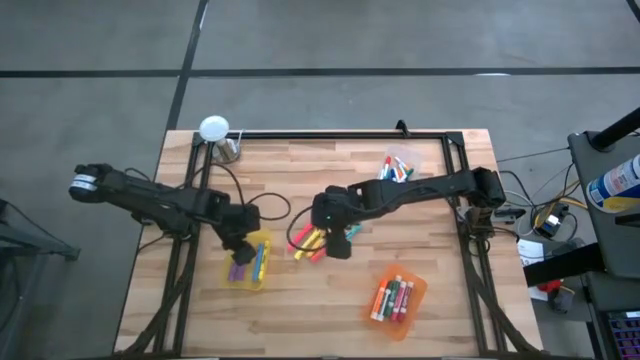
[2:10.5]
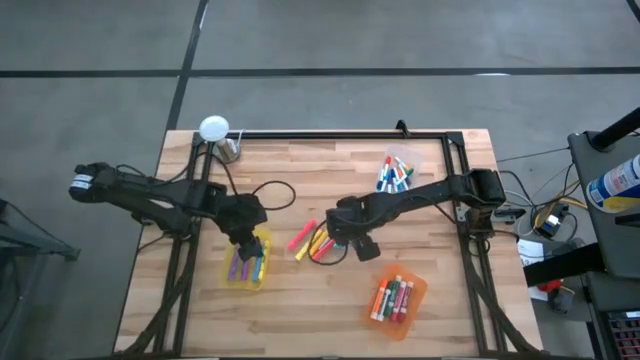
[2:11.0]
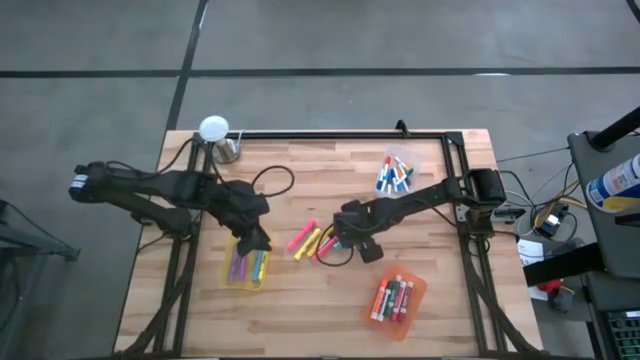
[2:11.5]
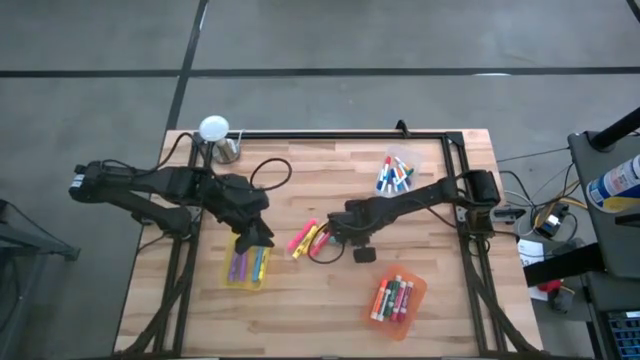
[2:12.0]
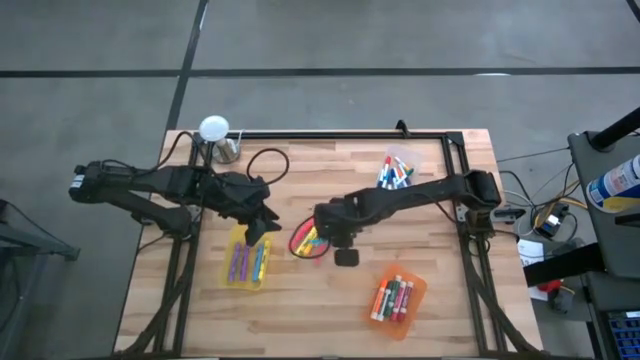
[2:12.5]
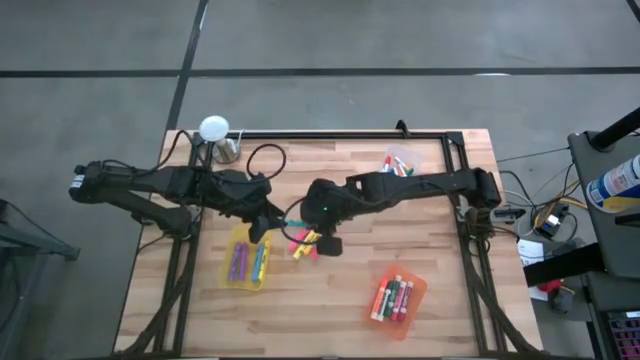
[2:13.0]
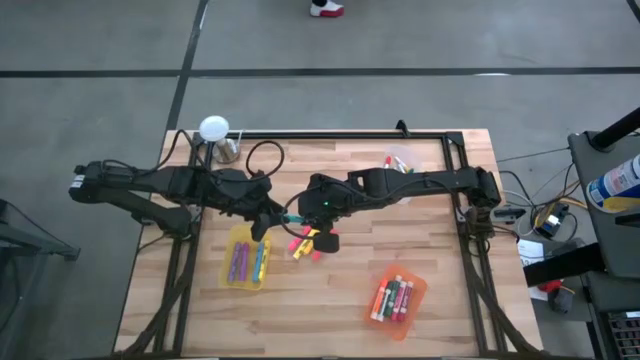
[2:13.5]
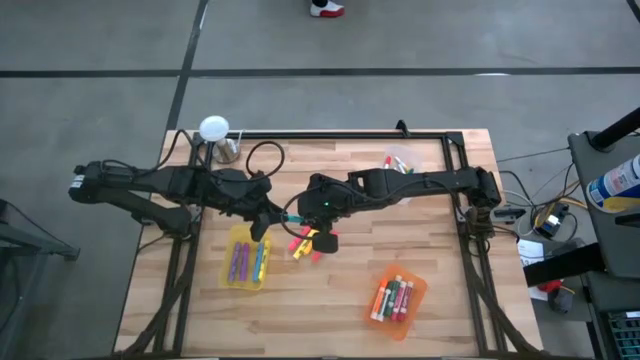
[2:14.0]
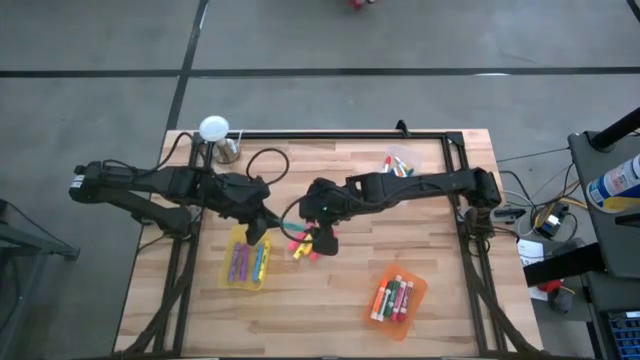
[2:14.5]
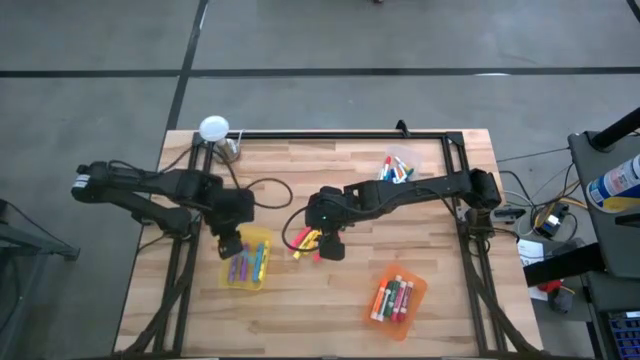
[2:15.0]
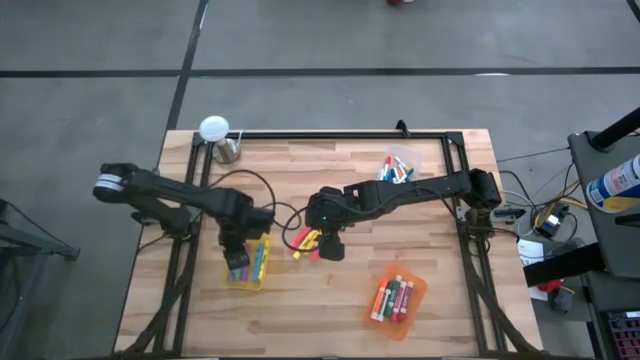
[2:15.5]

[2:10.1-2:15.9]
Task: Pick & Place Markers
Put the large light blue highlighter pen into the yellow bin

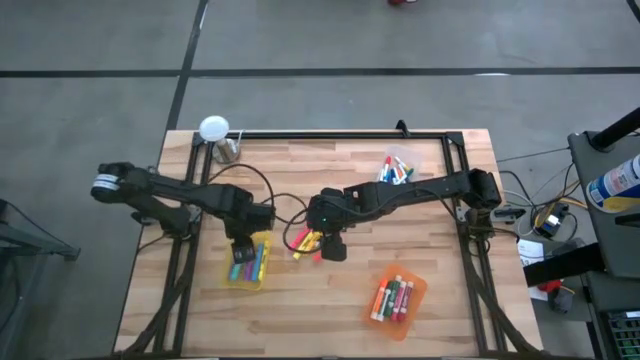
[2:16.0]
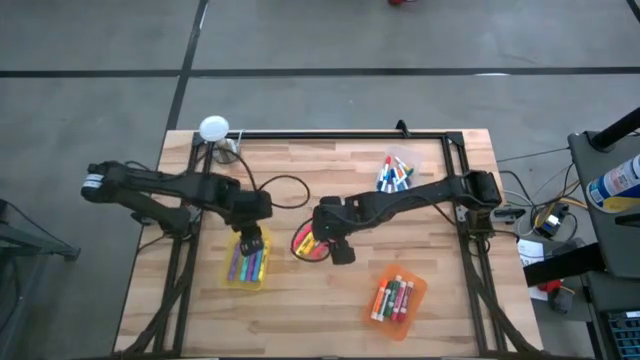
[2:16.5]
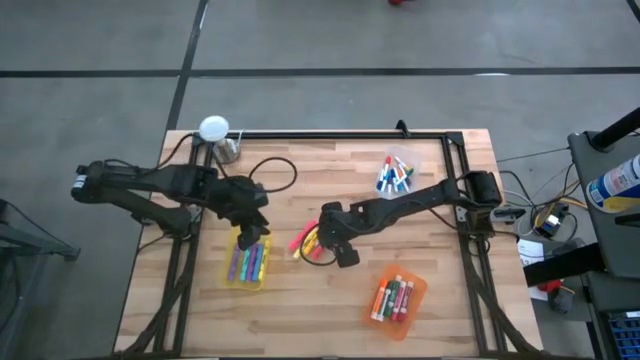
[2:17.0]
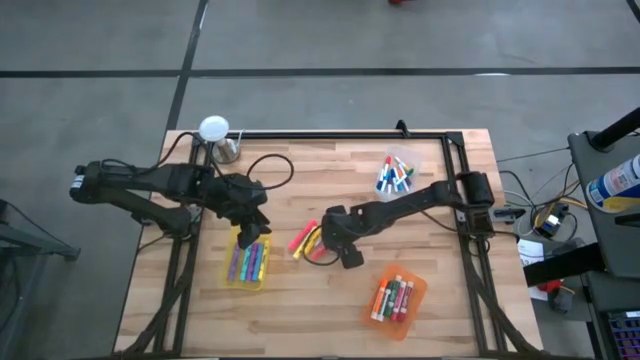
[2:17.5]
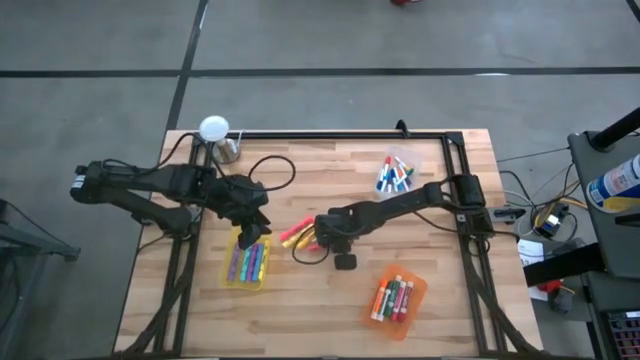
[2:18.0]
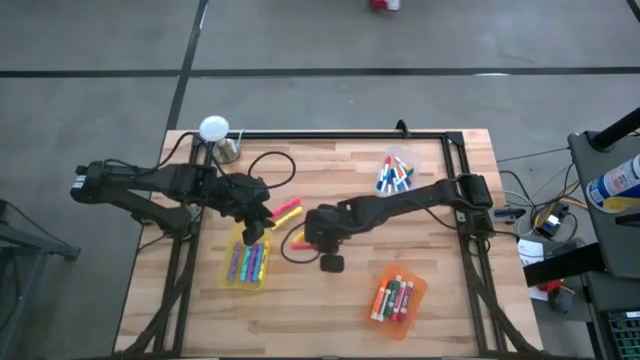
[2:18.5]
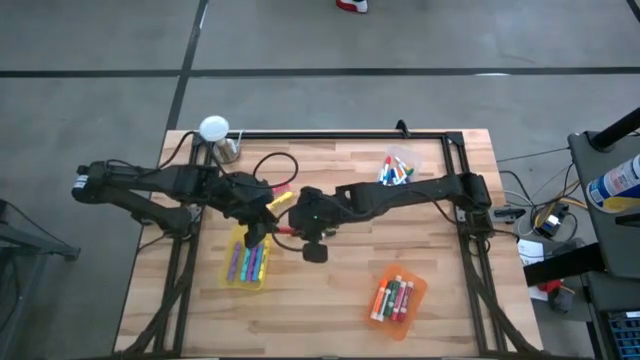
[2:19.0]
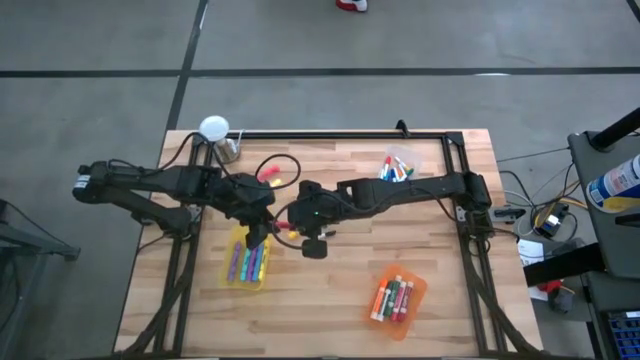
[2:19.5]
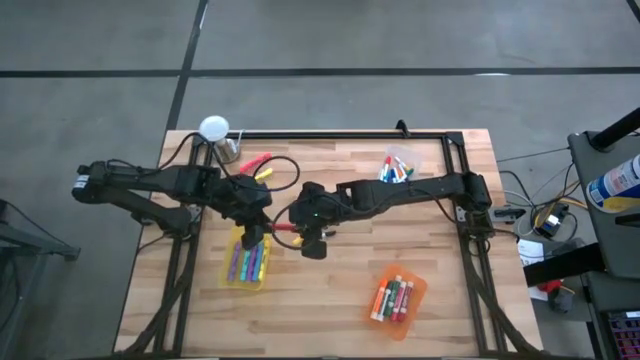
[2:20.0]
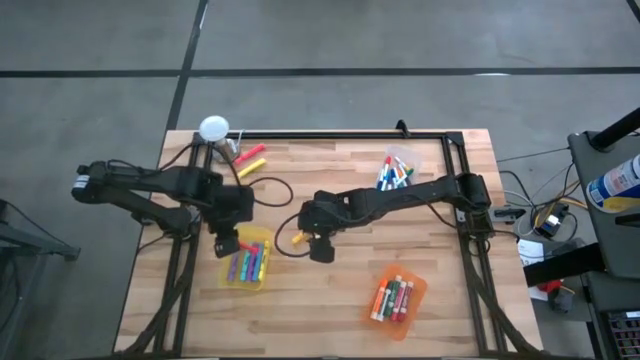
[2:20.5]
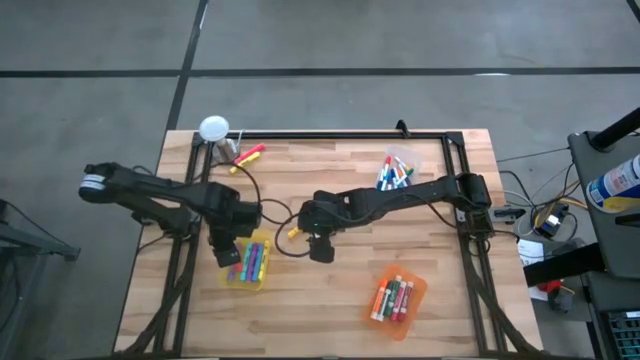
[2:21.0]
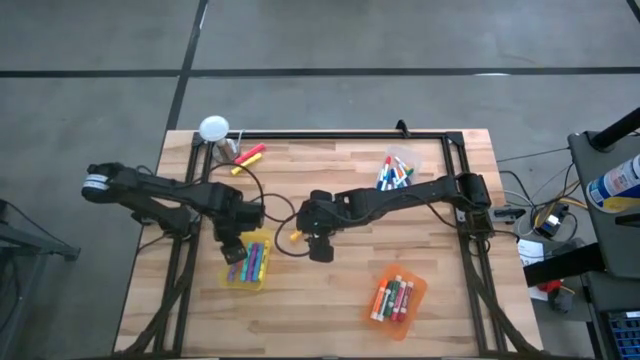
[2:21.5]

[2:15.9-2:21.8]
Put the large orange highlighter pen into the yellow bin

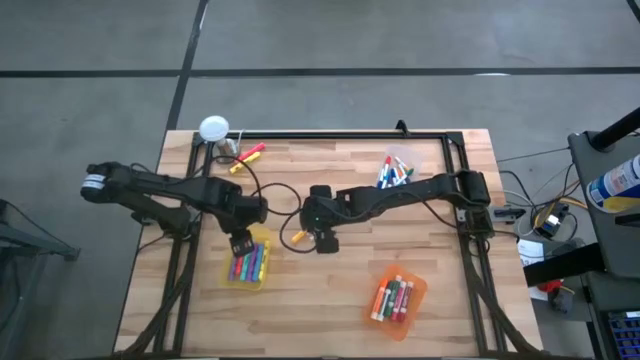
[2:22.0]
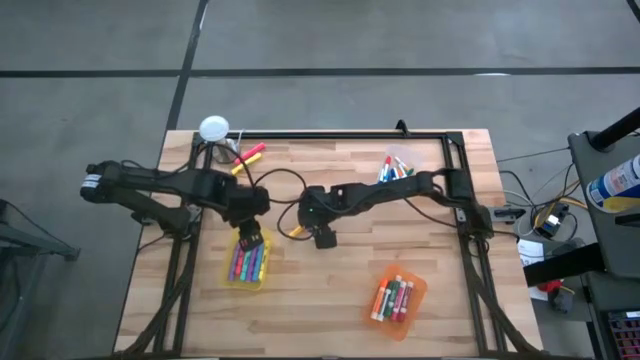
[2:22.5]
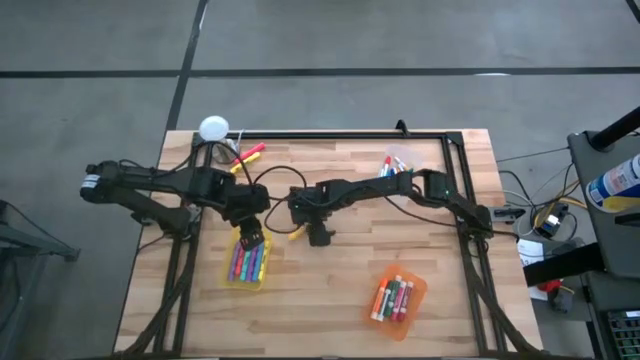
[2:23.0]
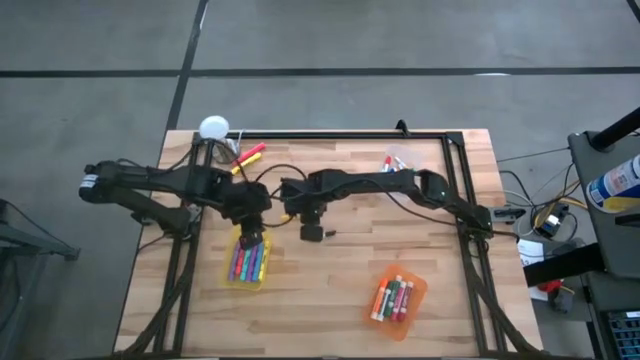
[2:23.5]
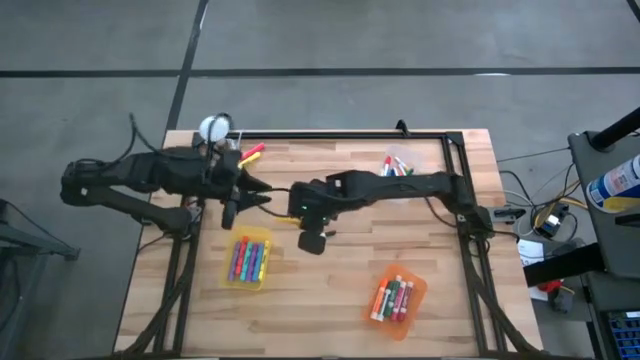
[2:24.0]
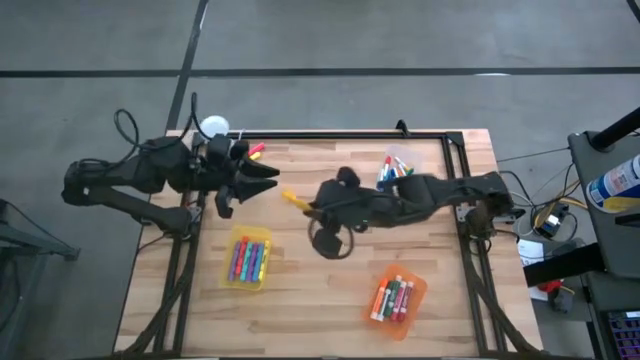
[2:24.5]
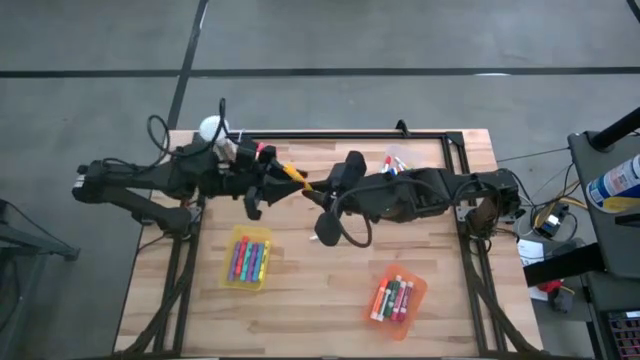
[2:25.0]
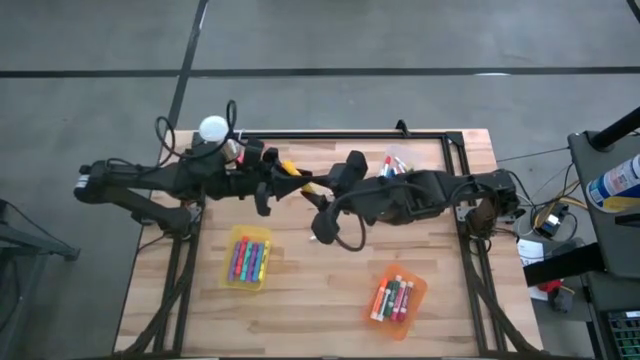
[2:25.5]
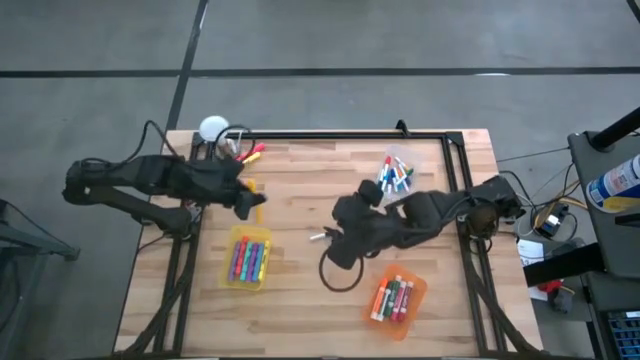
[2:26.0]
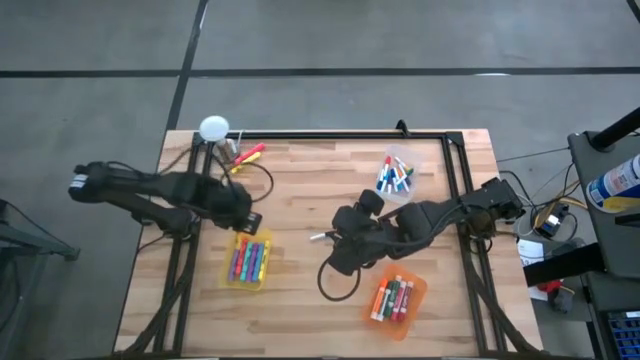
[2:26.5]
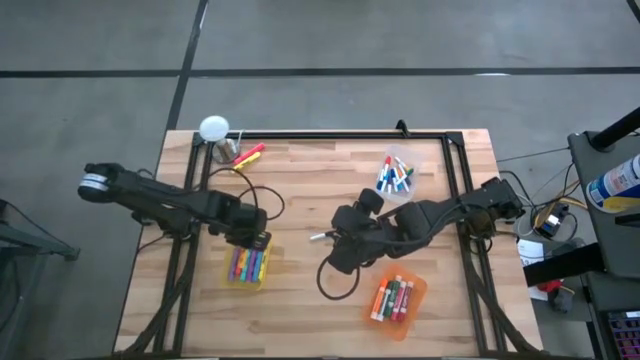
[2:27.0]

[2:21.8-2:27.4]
Put the bottom large yellow highlighter pen into the yellow bin

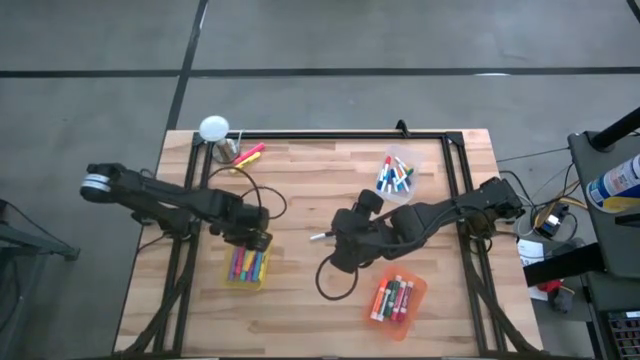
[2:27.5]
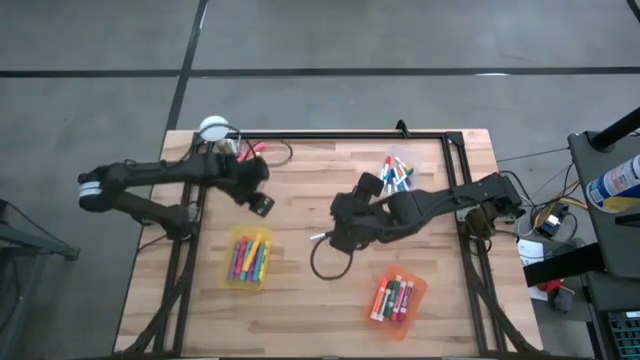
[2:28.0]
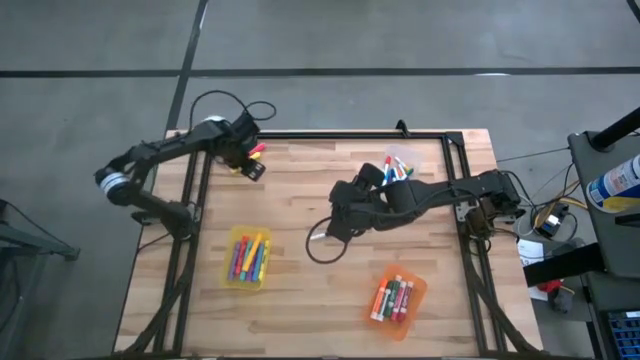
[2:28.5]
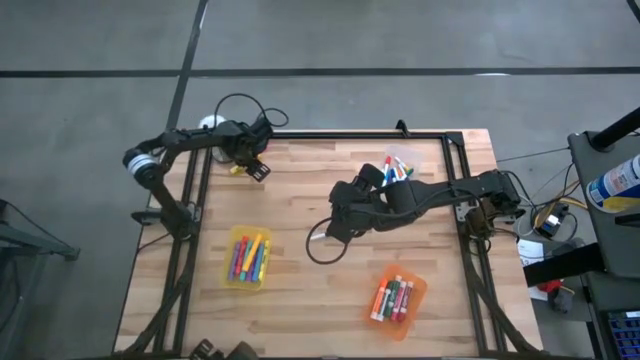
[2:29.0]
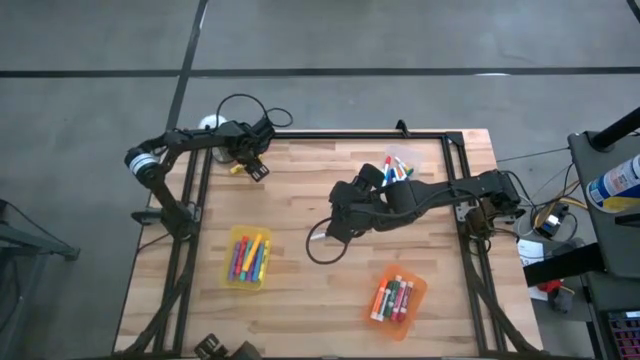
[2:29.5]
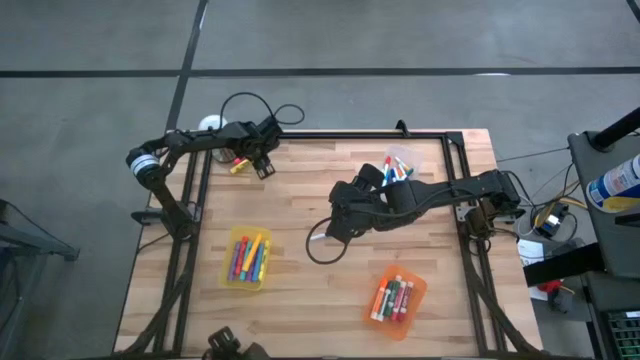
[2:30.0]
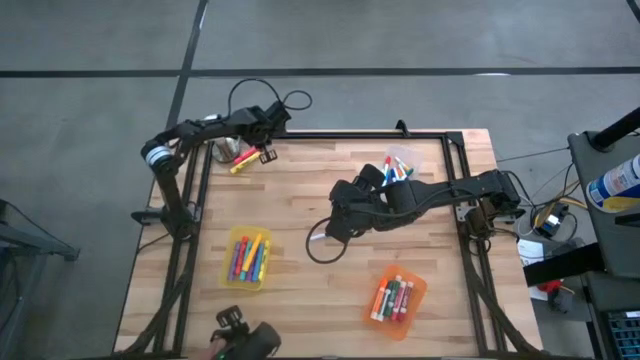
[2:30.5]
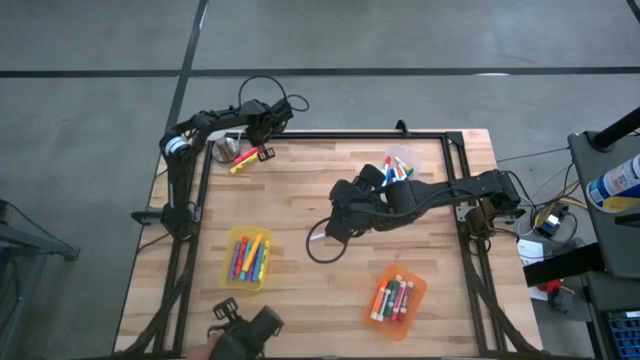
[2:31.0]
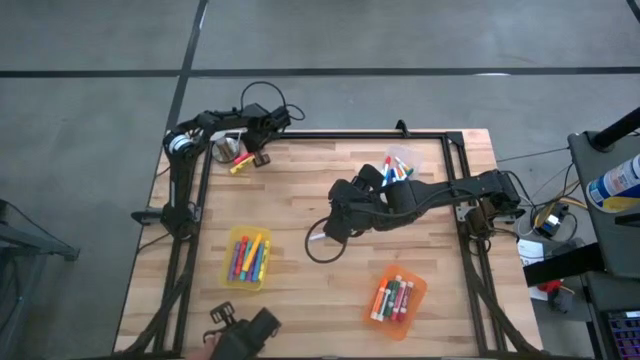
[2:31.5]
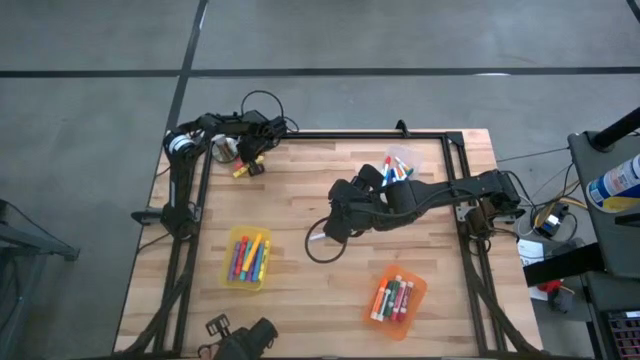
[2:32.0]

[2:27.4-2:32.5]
Move the large dark pink highlighter pen to the center of the table
